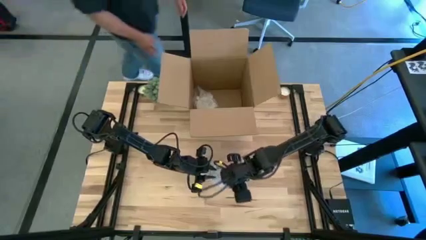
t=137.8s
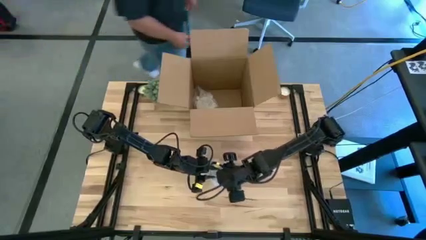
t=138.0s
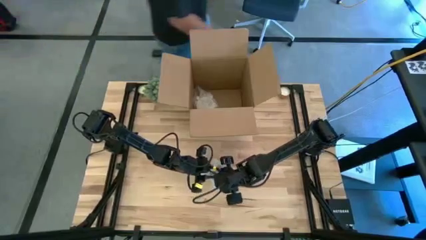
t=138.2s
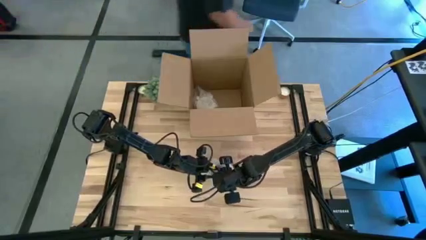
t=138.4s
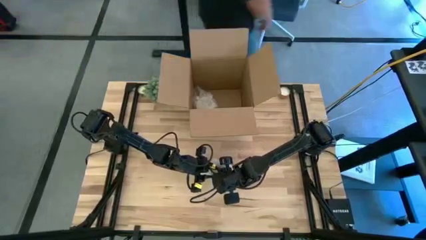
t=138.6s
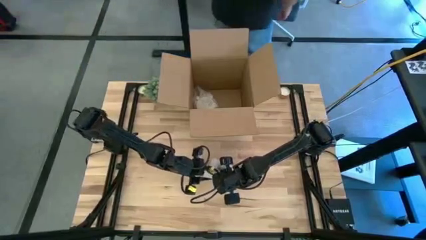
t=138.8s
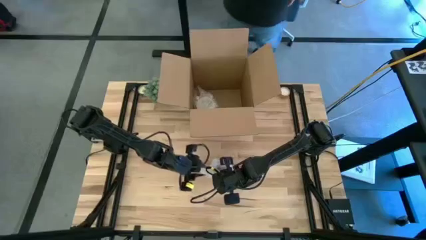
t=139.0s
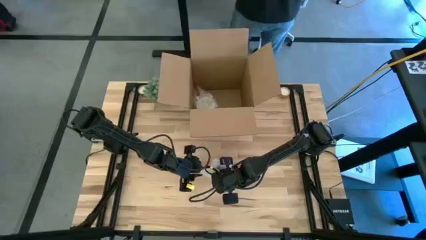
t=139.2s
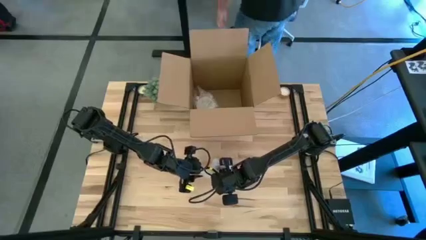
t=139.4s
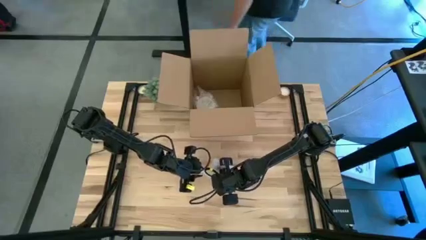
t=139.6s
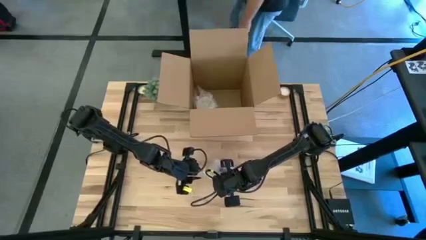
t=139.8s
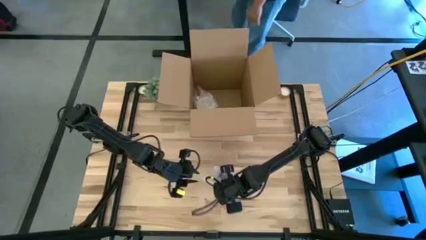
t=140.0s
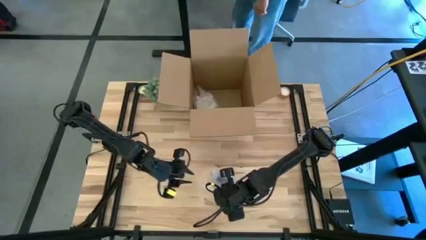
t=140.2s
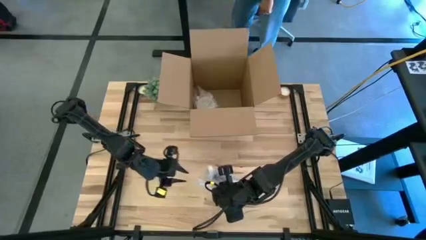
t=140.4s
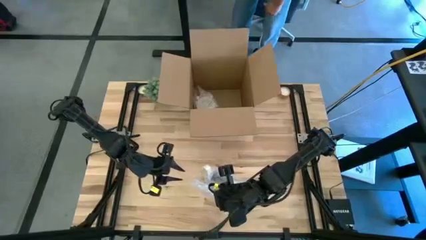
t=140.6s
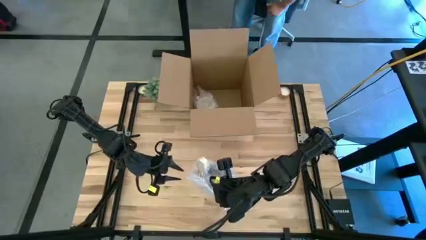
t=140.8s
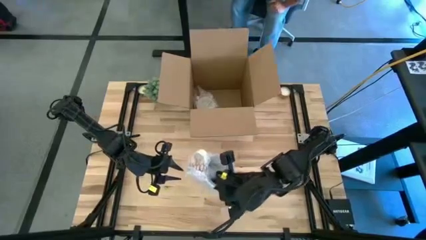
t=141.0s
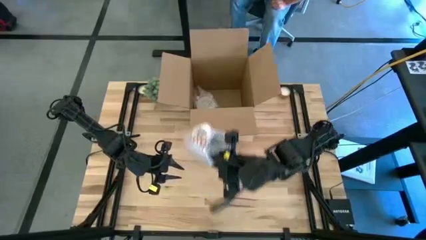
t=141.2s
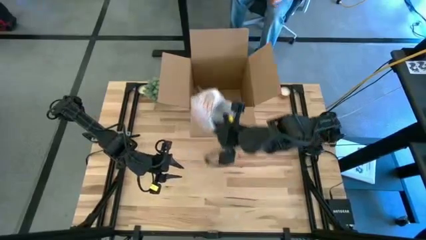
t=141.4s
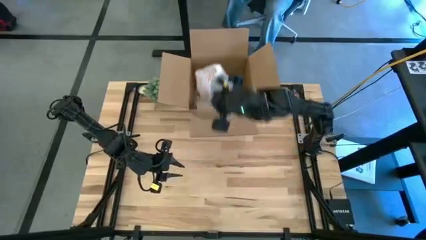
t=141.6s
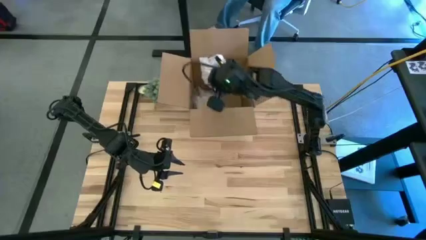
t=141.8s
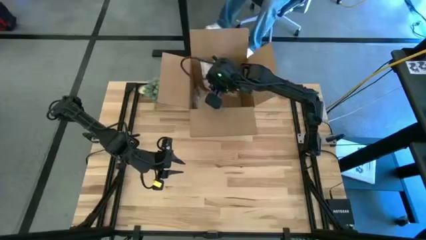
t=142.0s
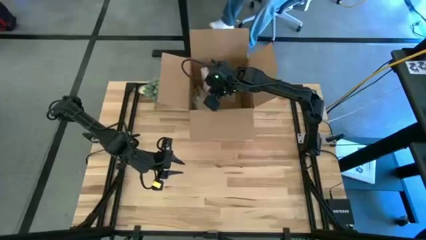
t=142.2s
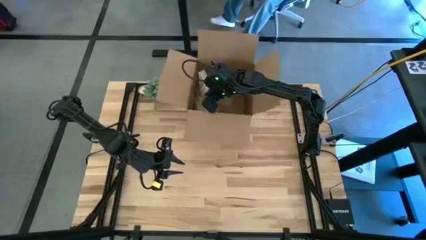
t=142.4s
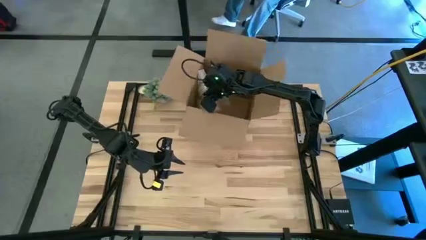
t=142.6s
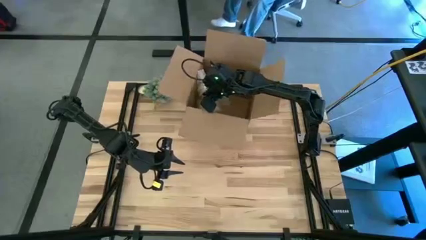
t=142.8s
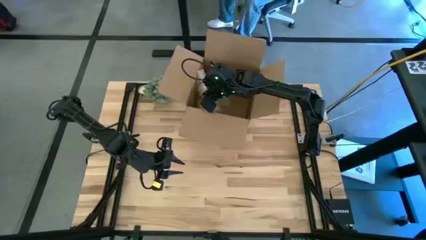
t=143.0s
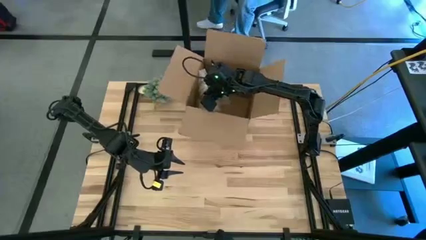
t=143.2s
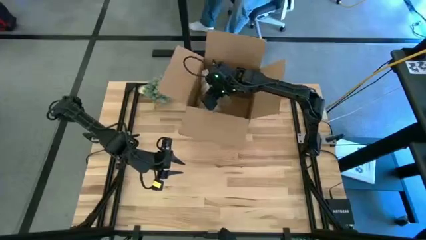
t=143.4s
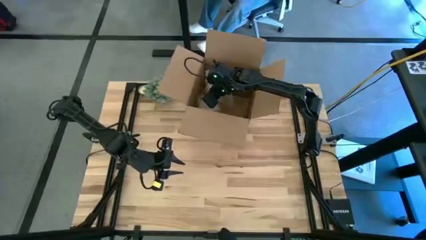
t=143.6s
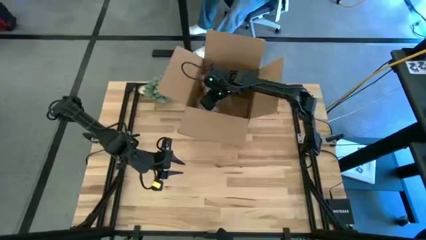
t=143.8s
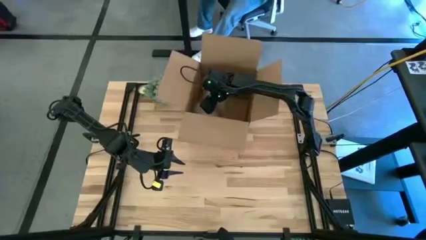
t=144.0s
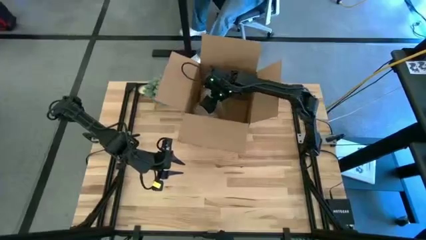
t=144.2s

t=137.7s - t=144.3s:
Task: wrap mug
Put the red mug into the box

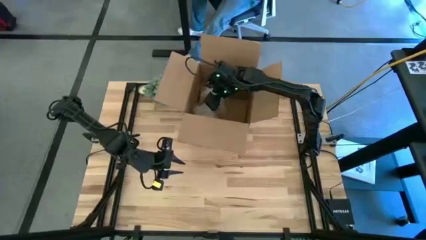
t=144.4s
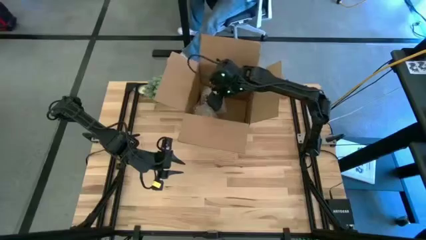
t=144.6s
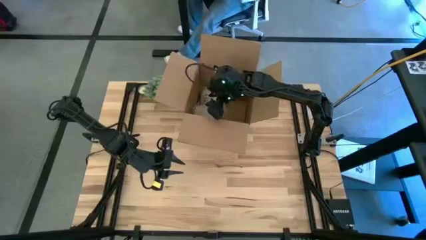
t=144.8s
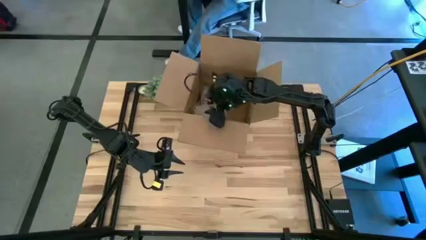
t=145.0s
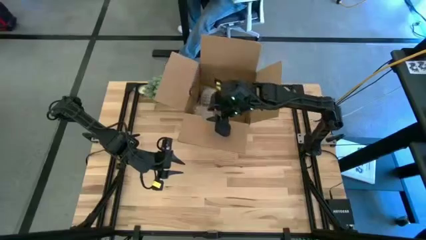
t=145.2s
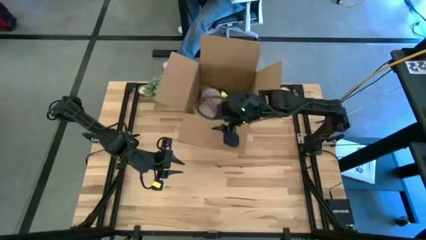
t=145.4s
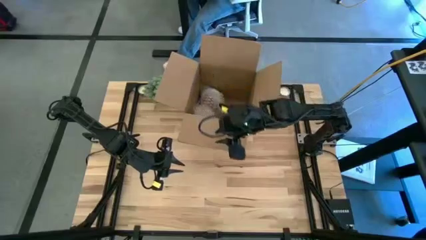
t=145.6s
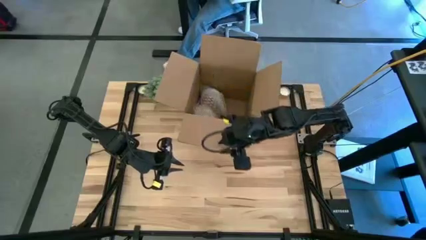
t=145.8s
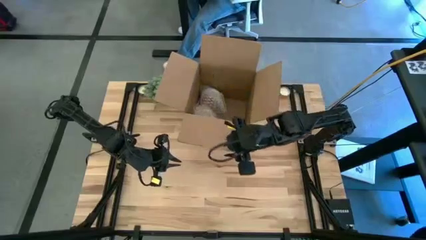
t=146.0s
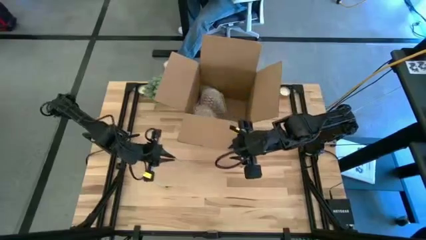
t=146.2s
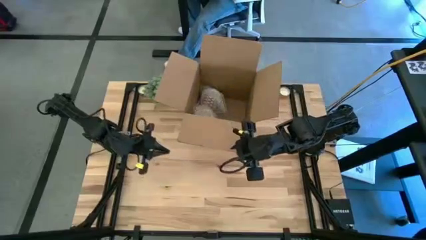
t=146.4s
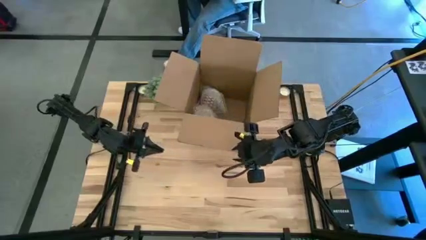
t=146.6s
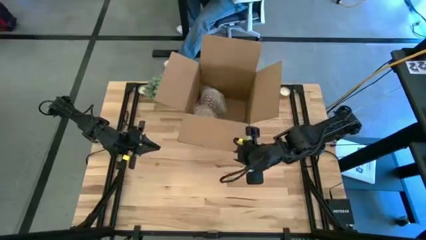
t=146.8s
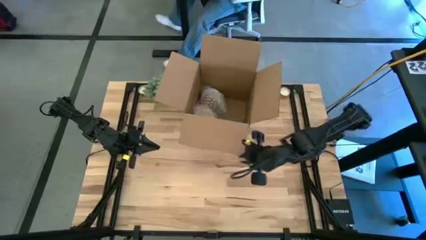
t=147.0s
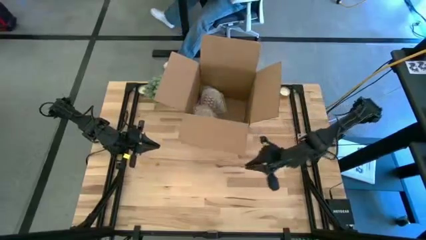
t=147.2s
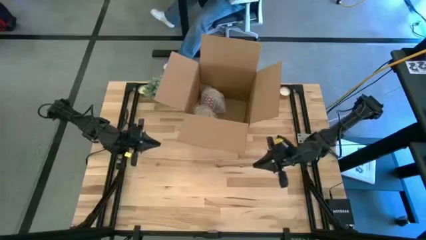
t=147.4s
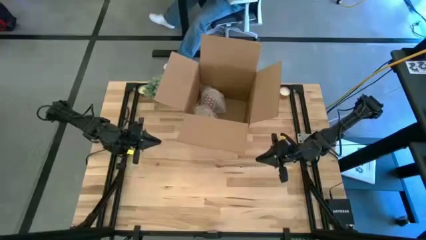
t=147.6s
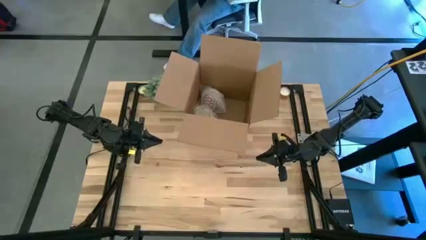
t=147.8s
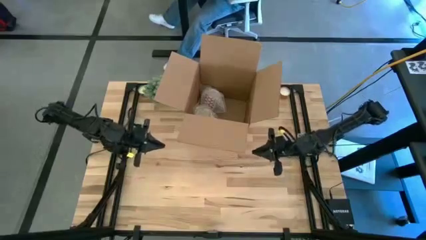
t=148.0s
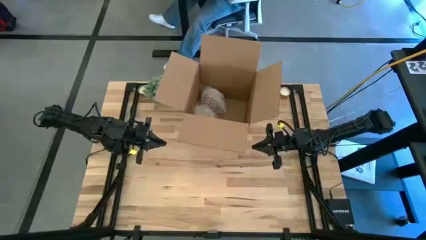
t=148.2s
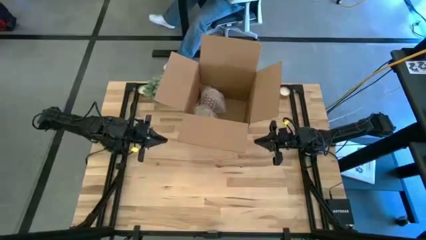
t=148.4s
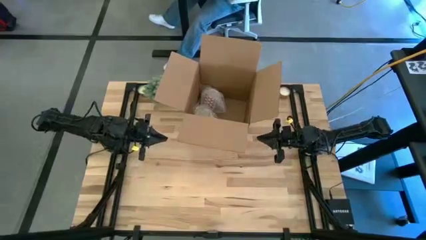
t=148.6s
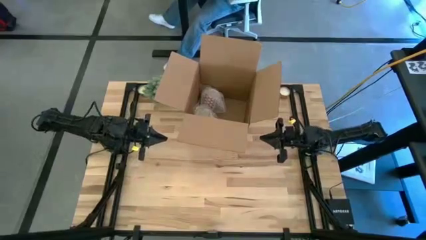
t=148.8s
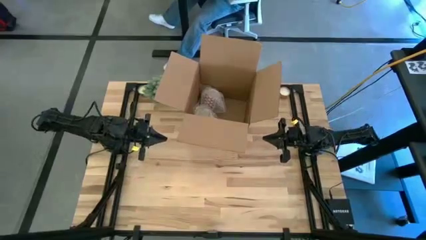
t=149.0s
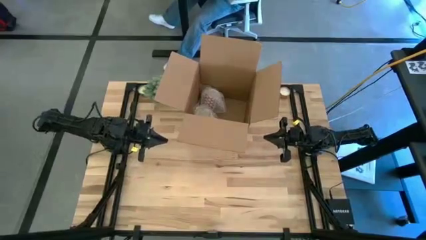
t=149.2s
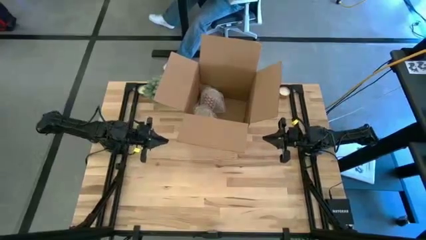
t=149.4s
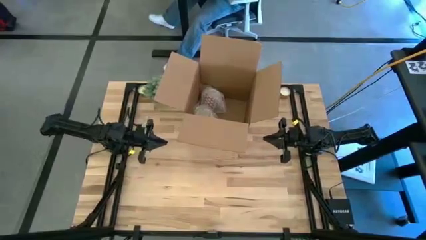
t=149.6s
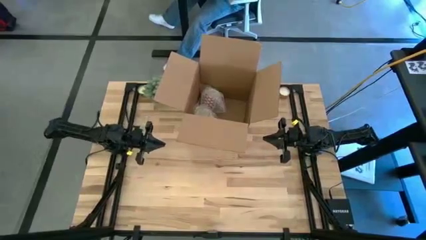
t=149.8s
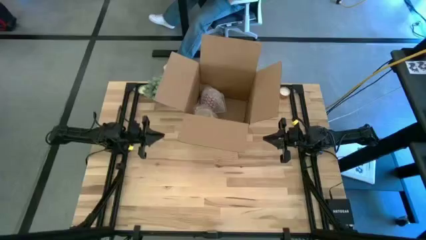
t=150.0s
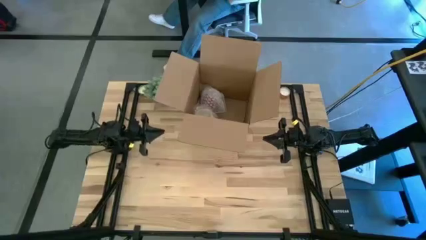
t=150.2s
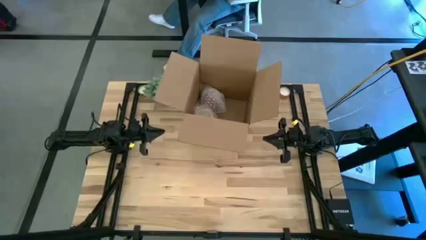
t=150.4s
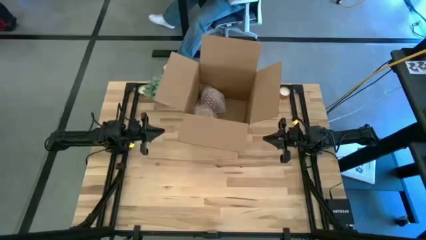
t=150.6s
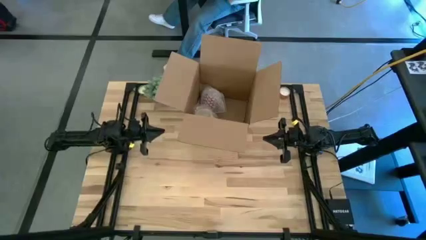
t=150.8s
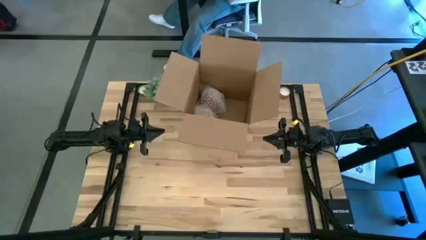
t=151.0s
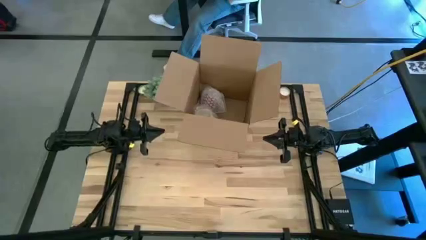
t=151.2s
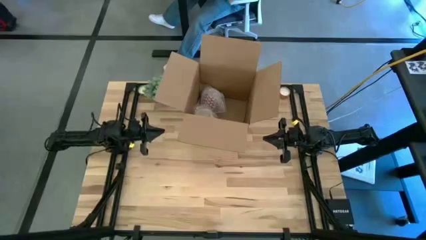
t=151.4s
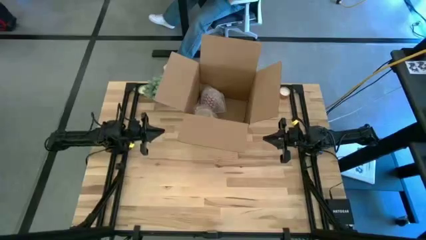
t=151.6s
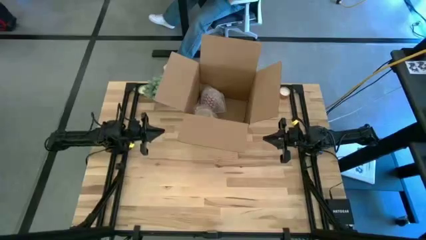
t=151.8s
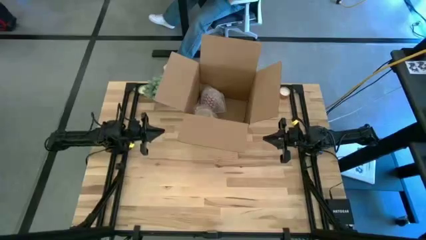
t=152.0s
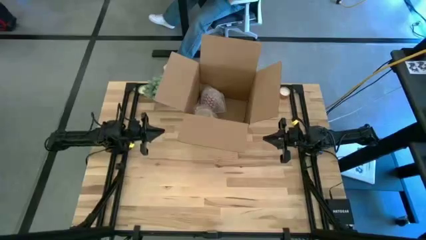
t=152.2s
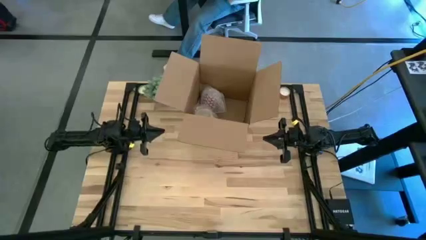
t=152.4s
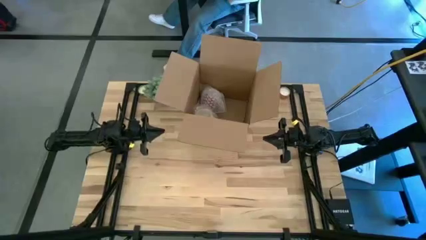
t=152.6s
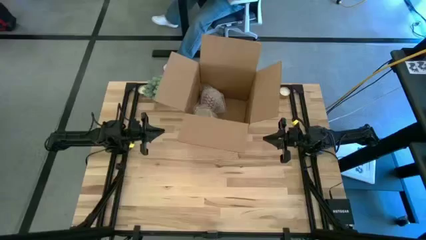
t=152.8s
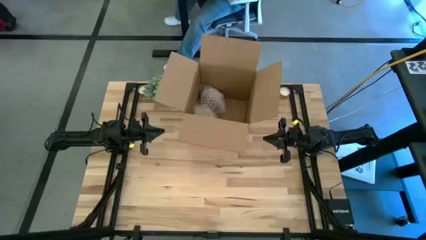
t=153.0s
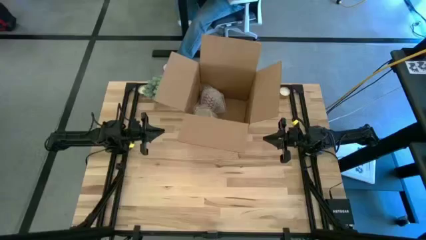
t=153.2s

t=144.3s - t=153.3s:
Return to Home Position

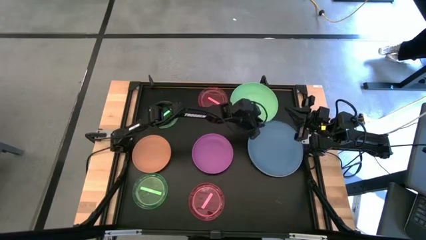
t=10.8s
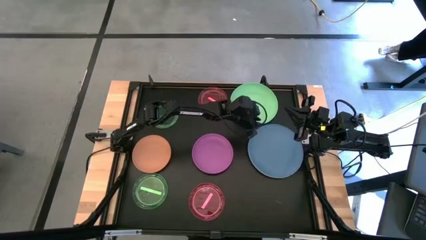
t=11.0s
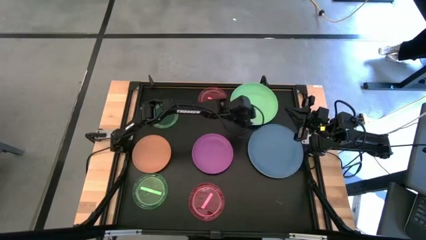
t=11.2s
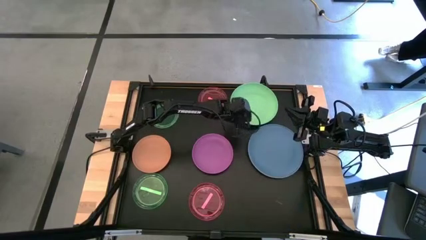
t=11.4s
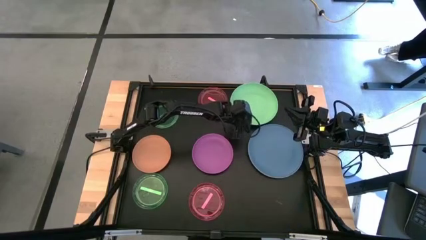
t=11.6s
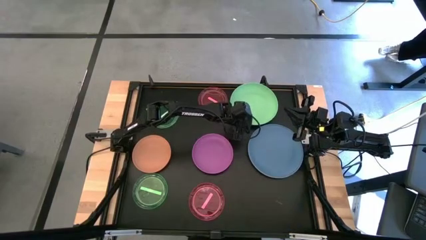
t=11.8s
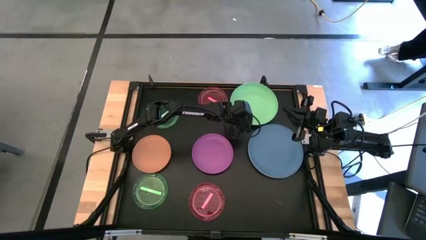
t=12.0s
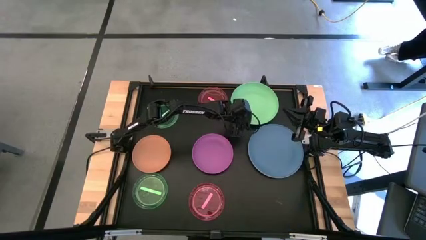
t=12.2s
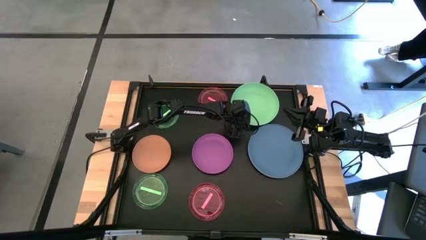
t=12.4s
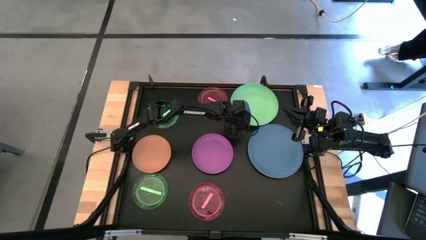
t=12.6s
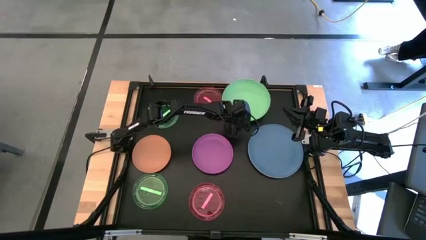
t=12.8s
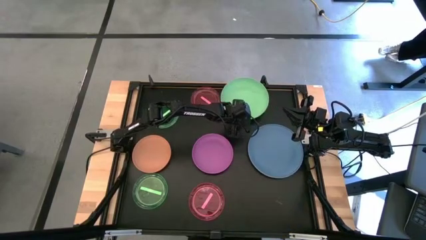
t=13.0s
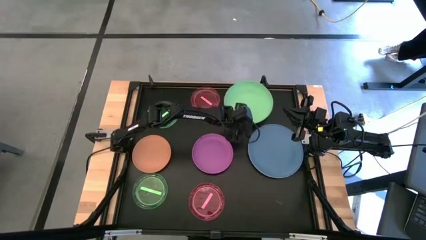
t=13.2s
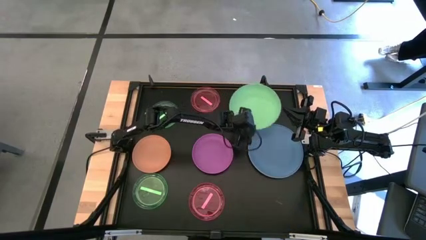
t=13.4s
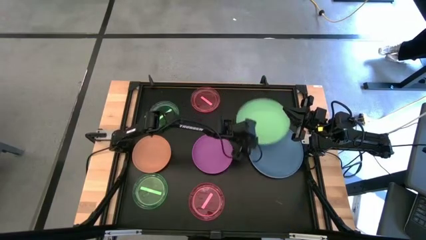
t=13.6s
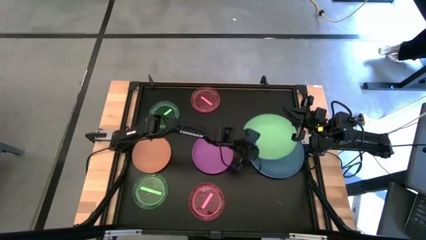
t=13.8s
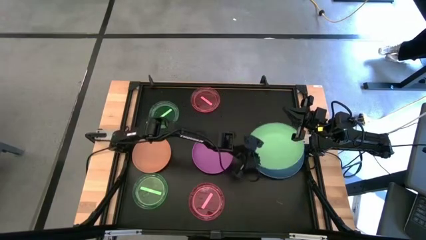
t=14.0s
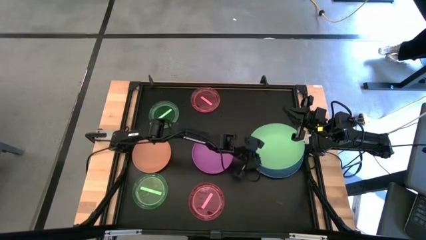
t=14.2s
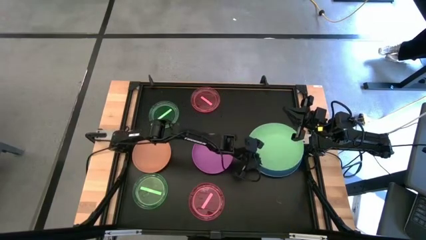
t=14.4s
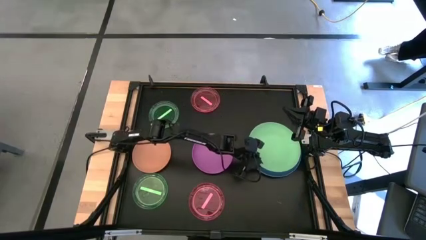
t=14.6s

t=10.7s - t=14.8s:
Task: Stack plastic plates
Stack the green plate on top of the blue plate
